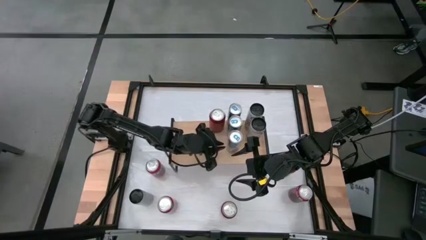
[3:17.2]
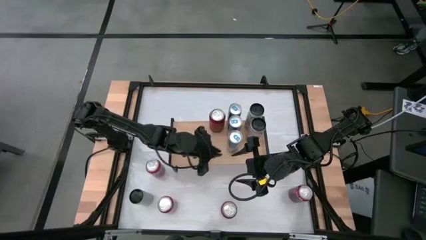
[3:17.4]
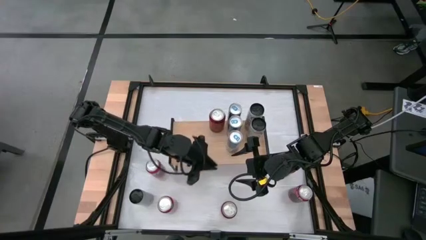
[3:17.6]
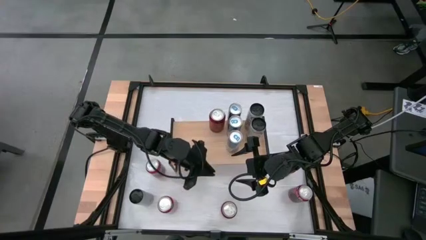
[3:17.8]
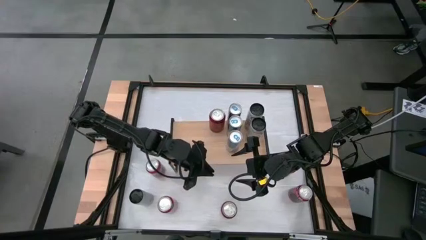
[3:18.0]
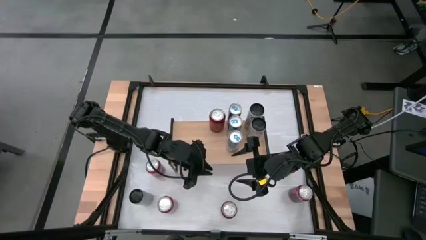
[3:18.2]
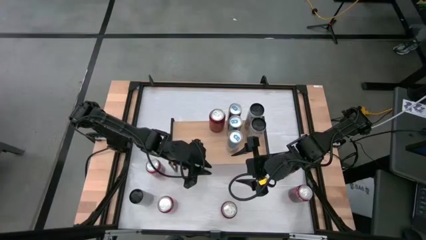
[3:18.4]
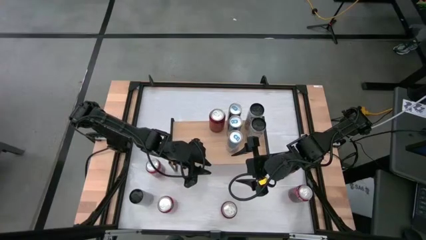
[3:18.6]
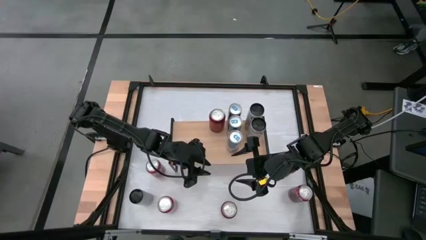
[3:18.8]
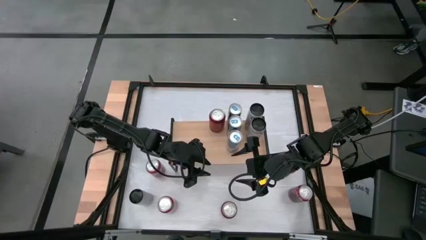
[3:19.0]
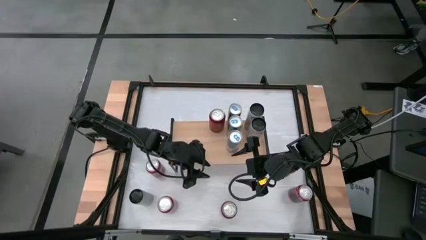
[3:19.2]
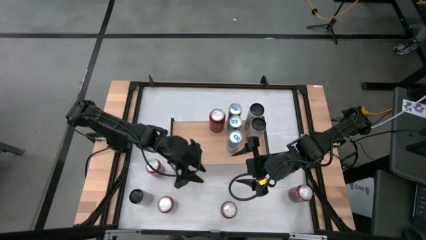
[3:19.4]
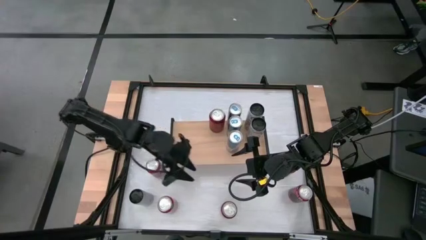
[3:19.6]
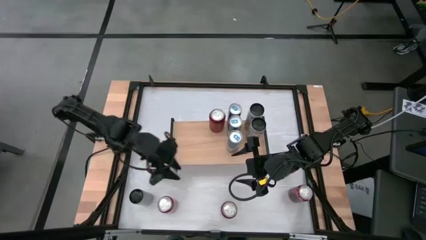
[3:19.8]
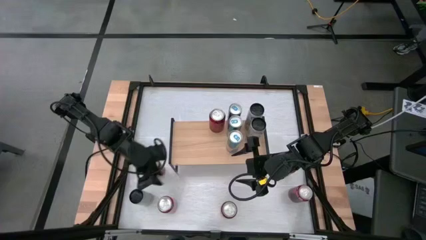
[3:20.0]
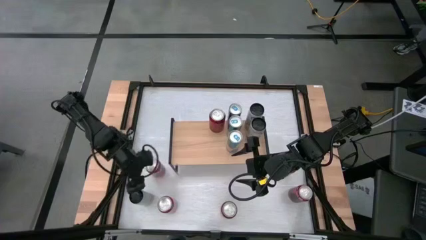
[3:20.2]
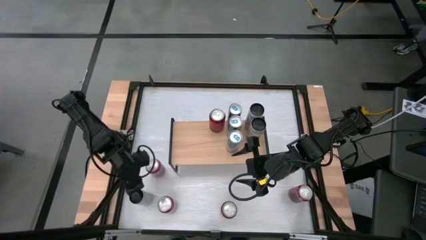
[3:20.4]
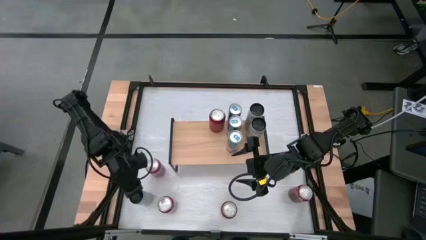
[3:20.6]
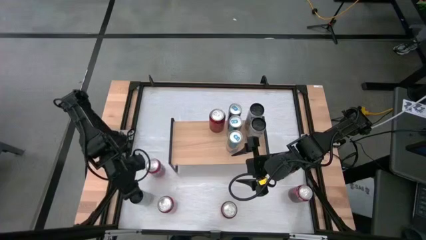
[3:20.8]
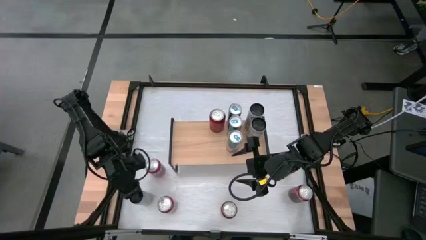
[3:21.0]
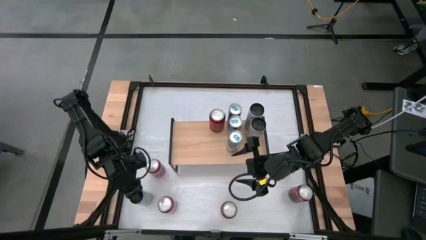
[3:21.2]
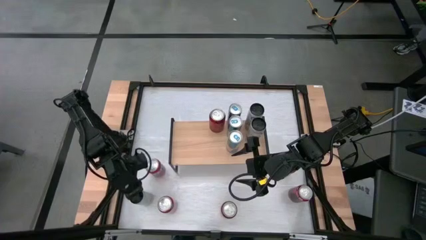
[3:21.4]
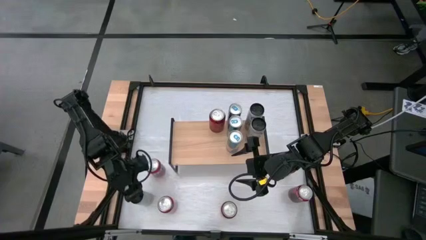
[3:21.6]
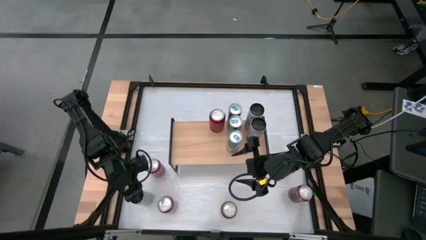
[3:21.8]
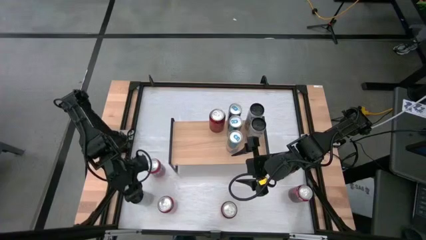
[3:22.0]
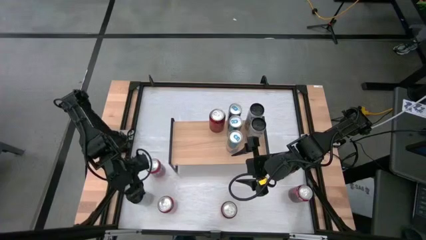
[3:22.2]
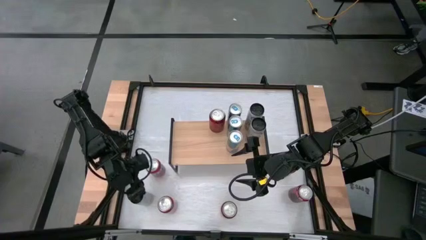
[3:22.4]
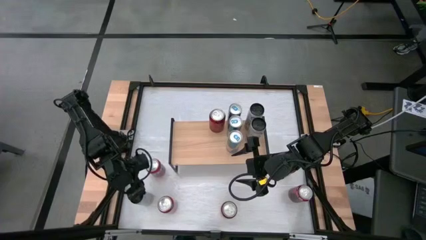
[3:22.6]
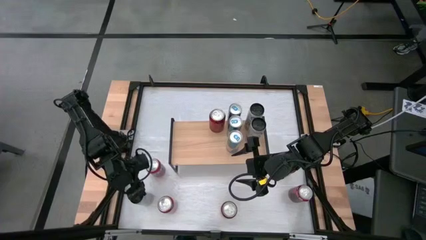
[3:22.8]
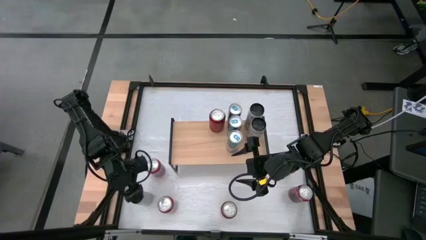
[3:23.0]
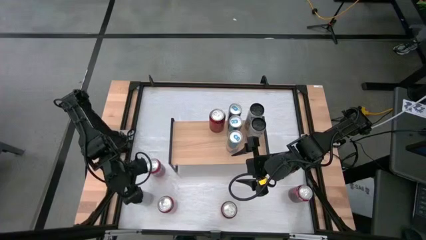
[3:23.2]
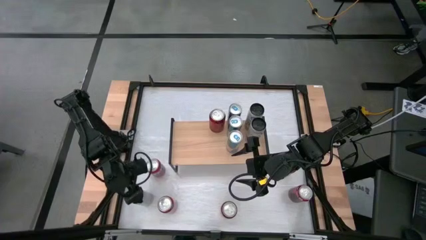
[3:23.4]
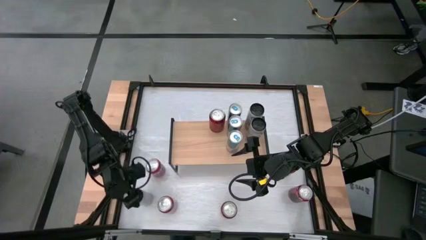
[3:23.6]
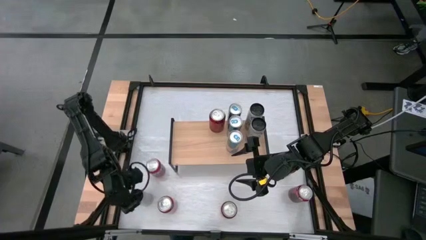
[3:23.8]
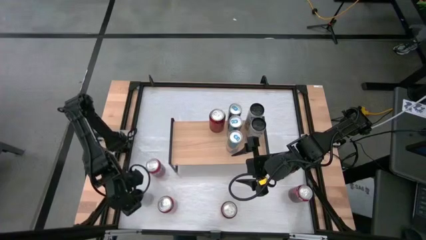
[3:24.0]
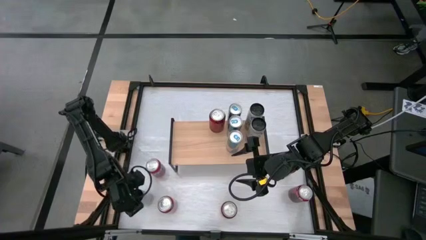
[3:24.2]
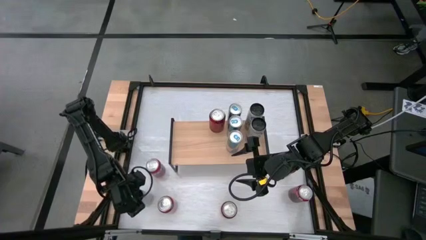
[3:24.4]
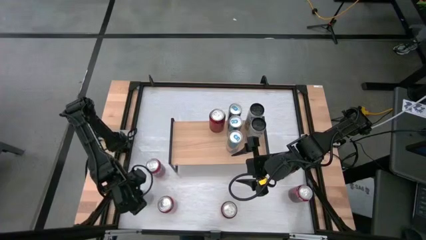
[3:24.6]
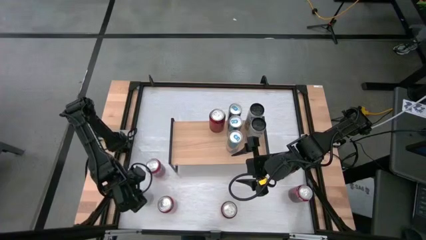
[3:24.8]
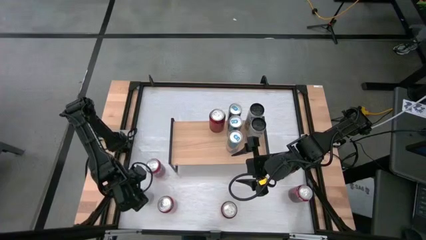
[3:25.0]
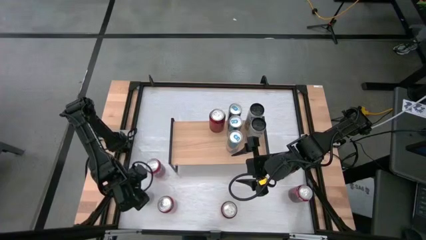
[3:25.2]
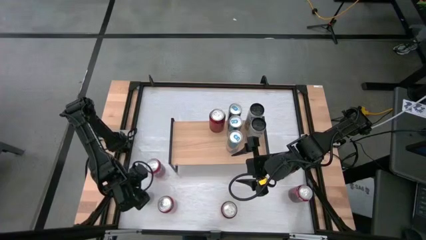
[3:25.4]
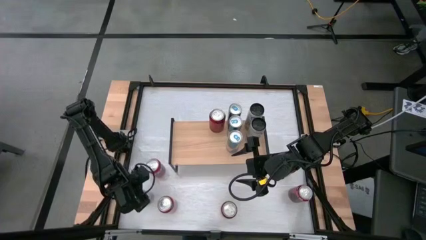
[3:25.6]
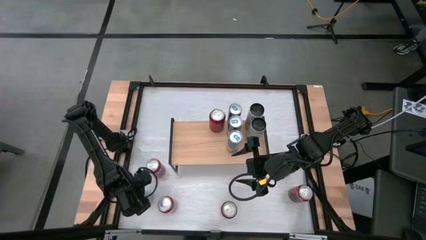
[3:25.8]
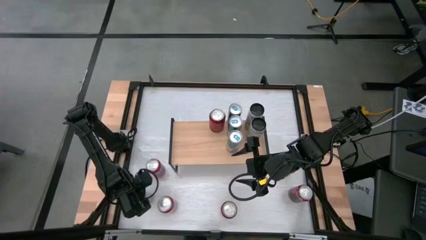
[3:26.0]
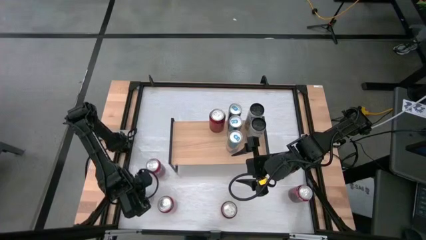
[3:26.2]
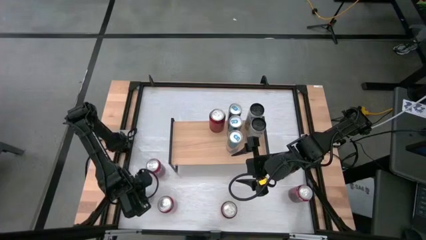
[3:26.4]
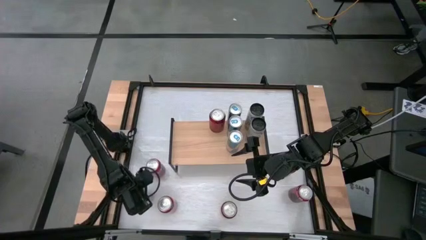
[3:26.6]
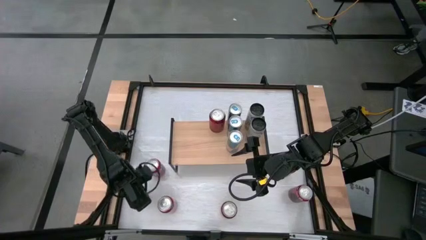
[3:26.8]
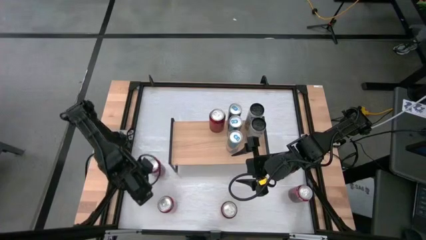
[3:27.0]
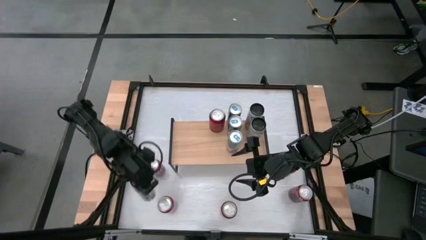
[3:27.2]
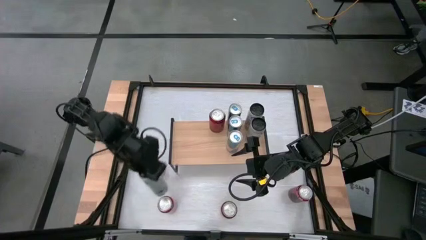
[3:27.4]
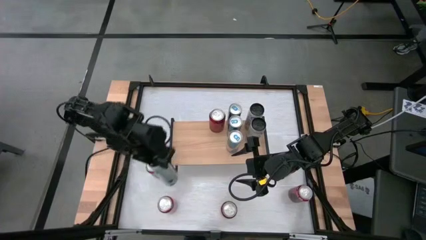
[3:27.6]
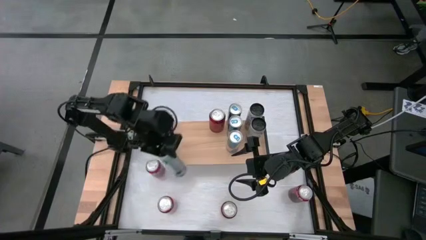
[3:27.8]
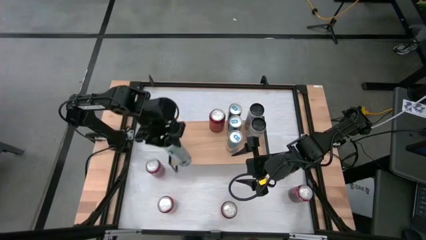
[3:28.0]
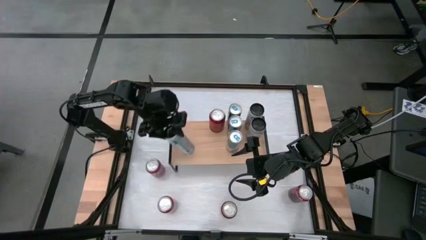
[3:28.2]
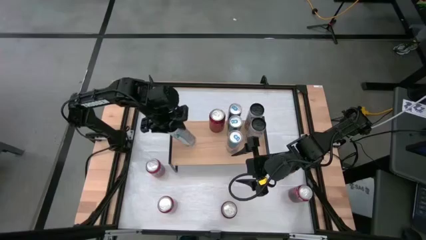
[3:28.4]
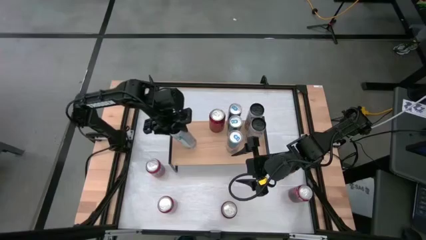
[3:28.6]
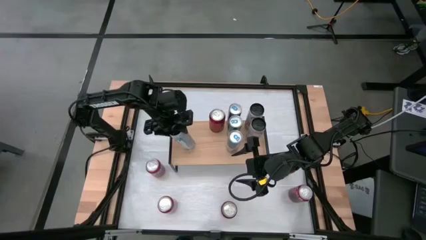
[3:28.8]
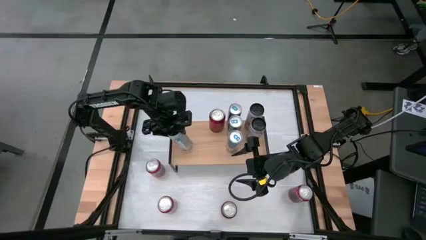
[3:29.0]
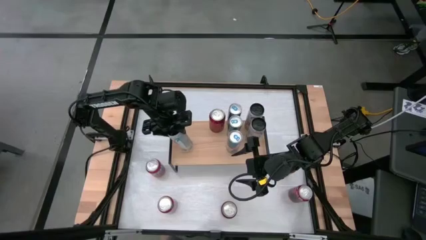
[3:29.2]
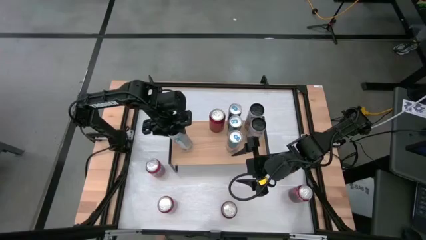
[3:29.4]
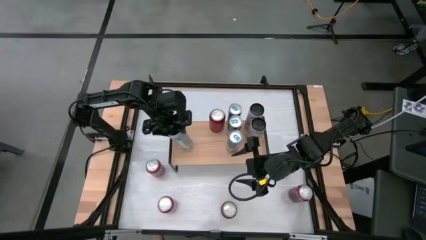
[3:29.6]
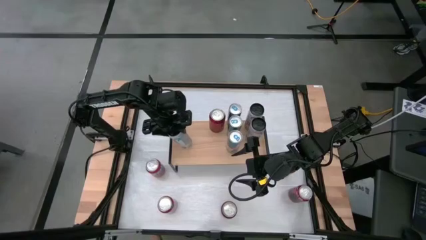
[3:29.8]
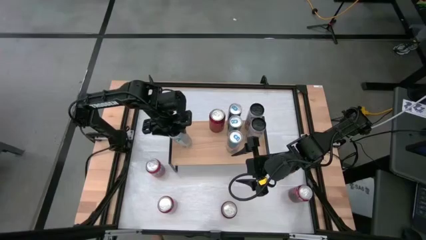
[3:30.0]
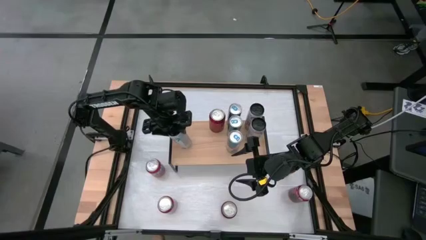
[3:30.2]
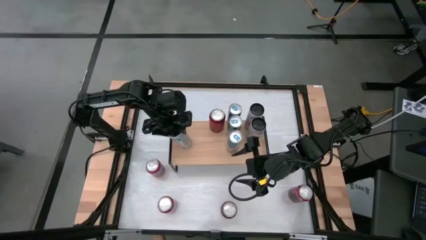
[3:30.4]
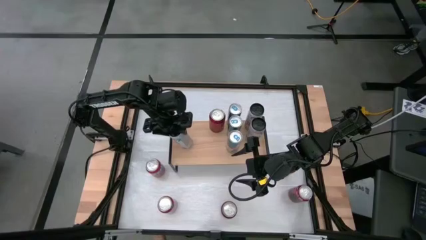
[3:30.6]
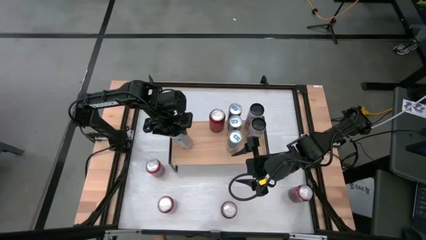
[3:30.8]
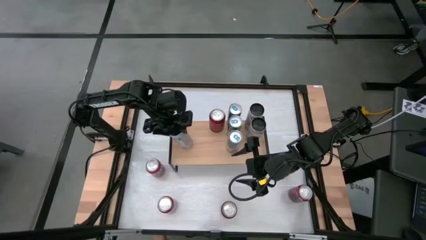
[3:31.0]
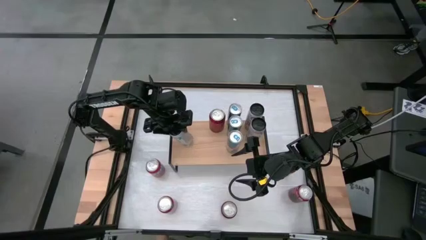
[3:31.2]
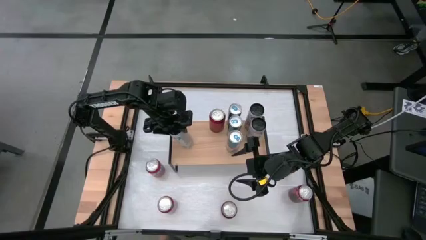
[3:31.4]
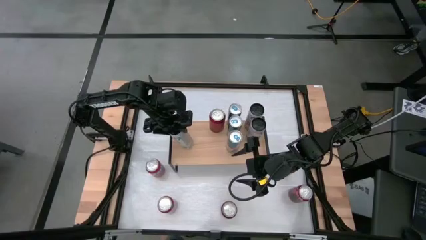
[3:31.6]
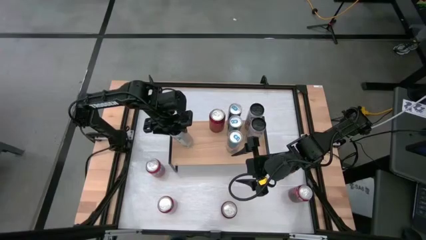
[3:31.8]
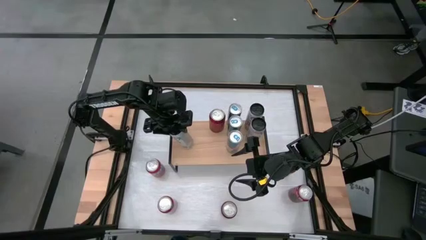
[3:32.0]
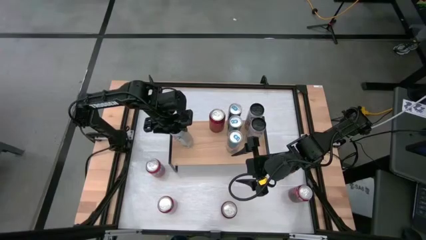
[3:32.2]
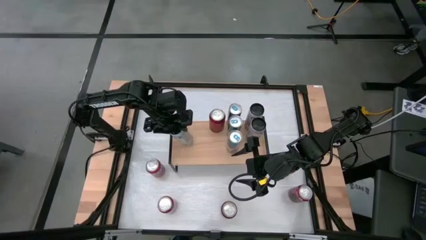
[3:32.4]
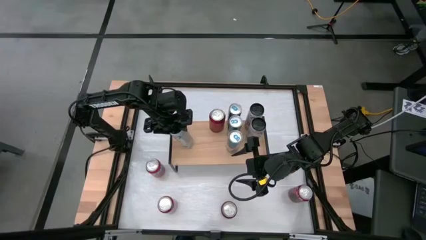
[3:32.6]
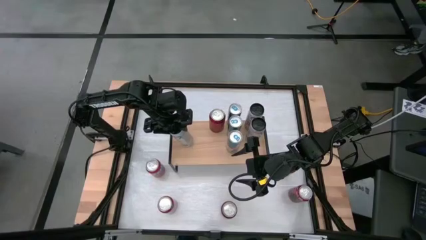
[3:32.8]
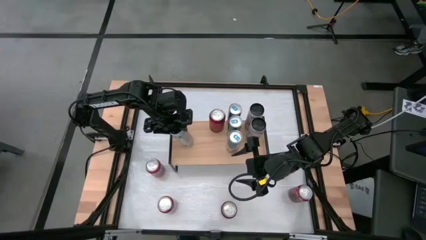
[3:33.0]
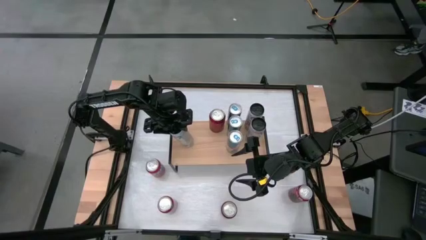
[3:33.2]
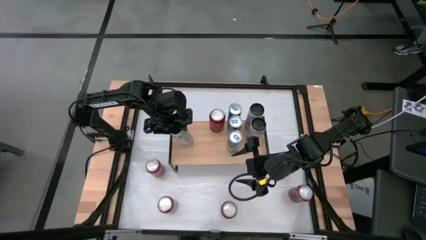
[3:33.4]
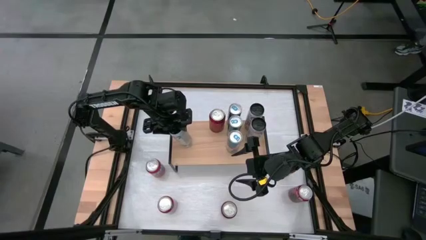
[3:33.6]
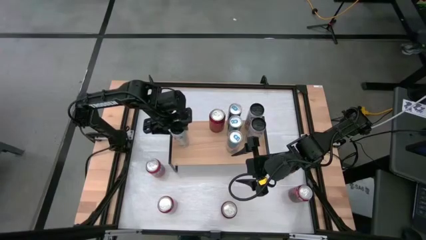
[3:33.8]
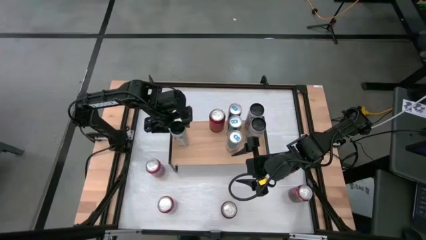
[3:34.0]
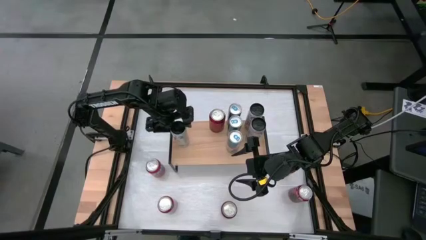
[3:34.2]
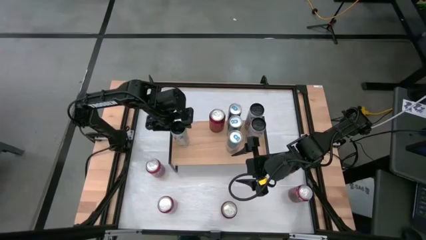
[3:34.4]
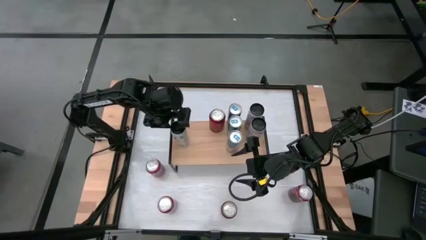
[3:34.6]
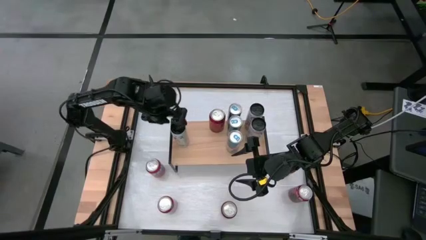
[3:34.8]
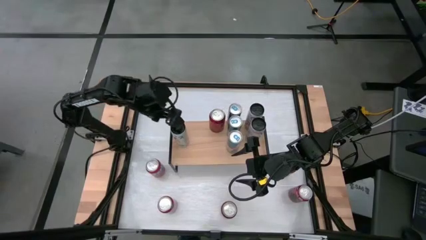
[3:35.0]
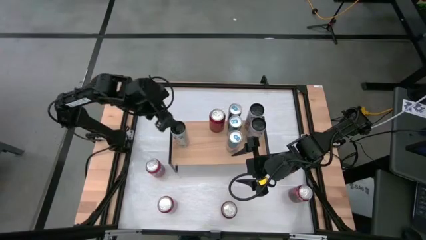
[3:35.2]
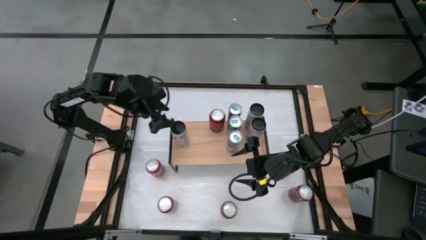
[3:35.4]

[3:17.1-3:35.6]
Task: Place canned beverage on shelf
Put the white-pink soda can on the shelf aligned with the other white-pink soda cans
